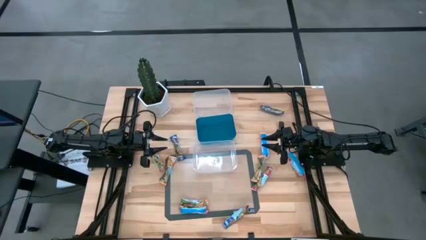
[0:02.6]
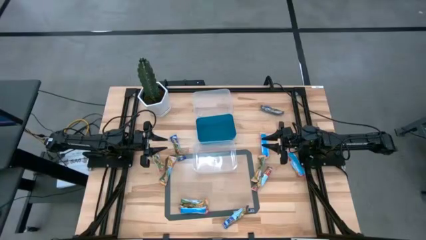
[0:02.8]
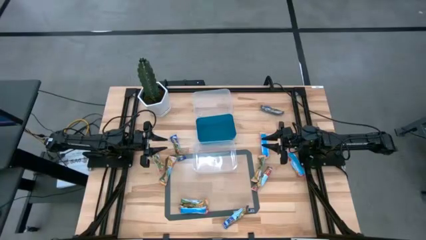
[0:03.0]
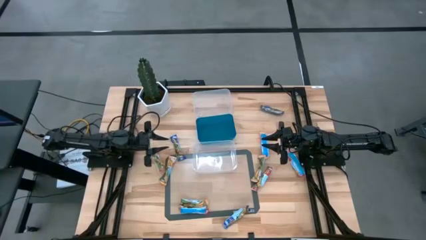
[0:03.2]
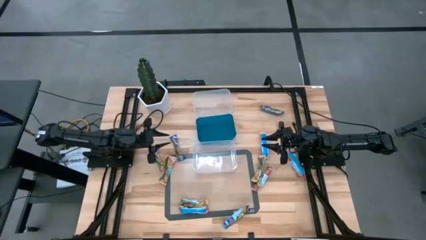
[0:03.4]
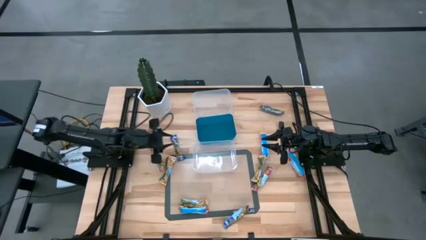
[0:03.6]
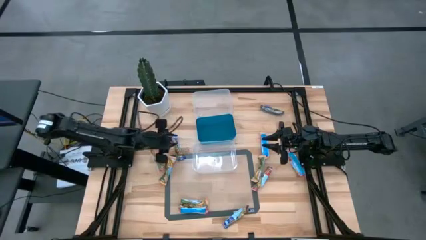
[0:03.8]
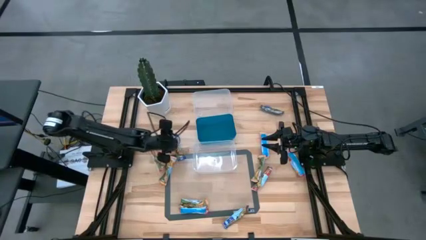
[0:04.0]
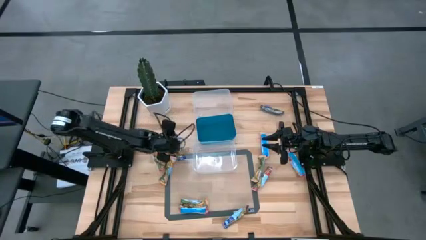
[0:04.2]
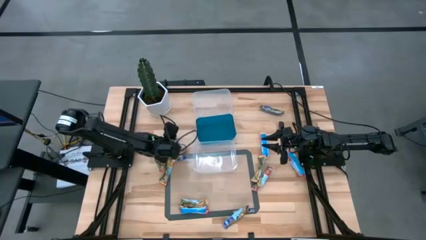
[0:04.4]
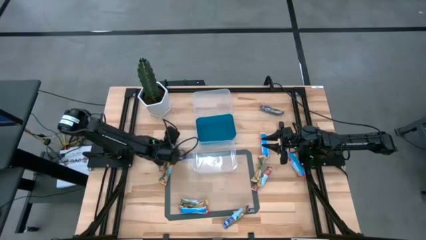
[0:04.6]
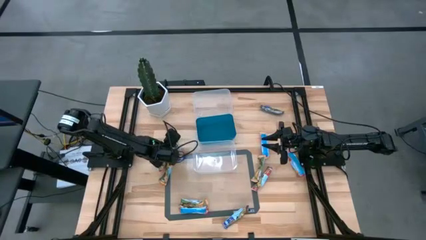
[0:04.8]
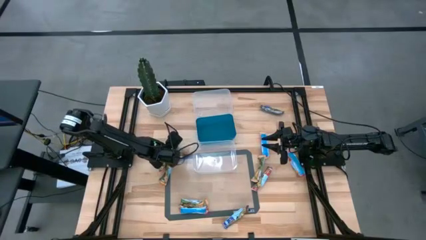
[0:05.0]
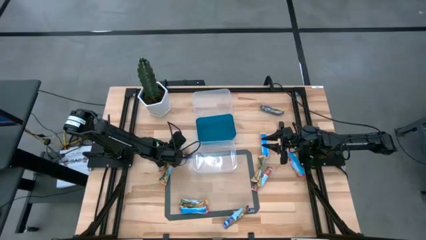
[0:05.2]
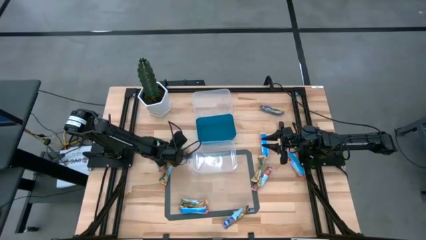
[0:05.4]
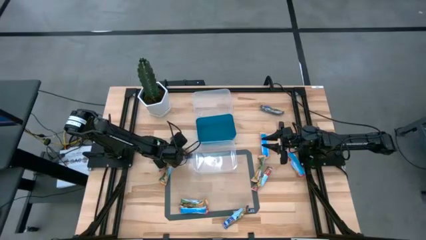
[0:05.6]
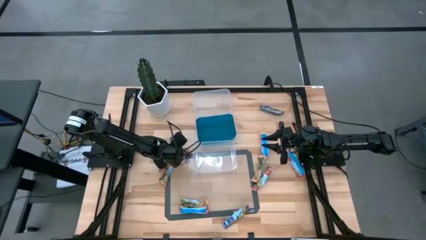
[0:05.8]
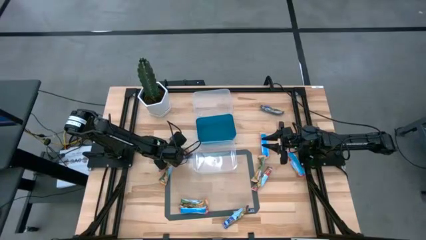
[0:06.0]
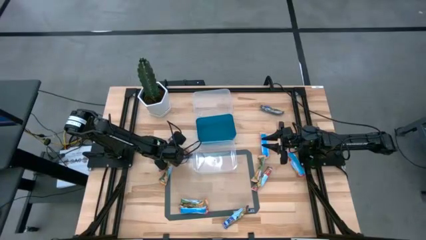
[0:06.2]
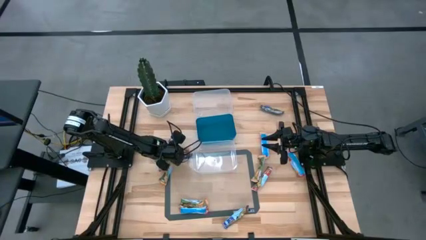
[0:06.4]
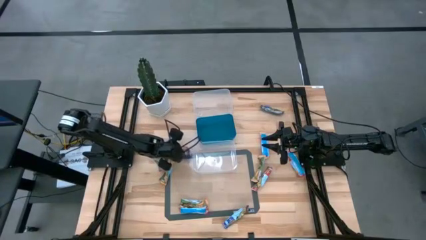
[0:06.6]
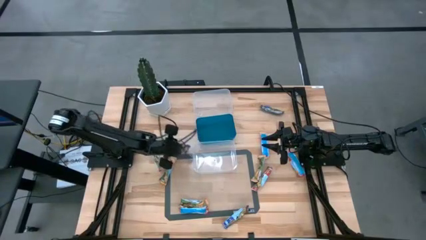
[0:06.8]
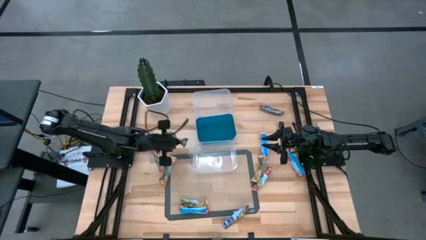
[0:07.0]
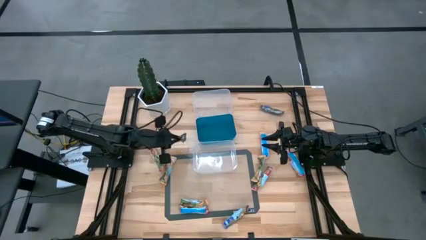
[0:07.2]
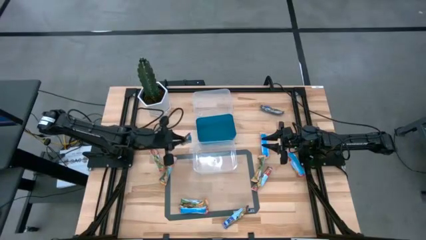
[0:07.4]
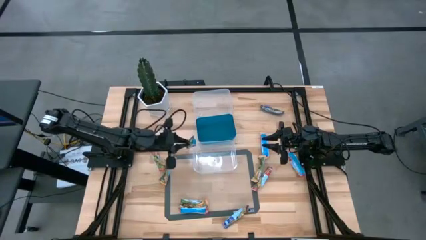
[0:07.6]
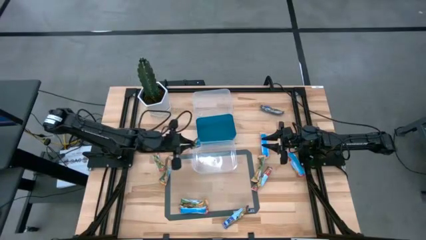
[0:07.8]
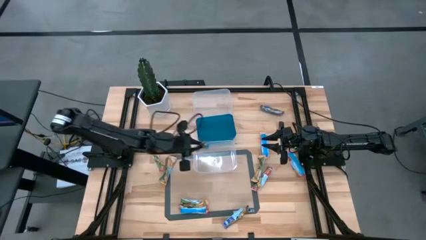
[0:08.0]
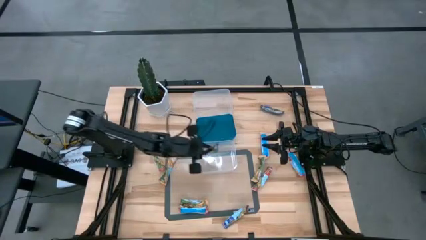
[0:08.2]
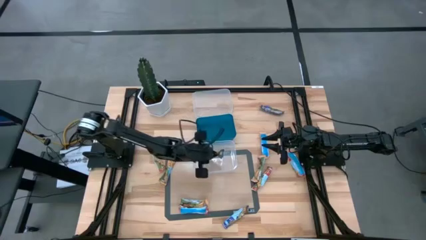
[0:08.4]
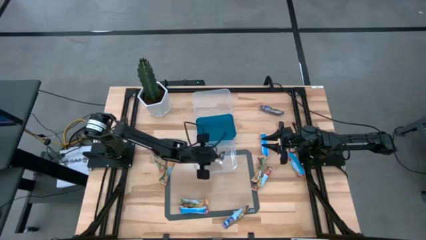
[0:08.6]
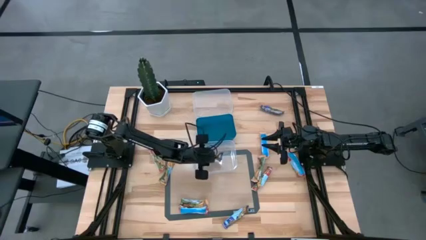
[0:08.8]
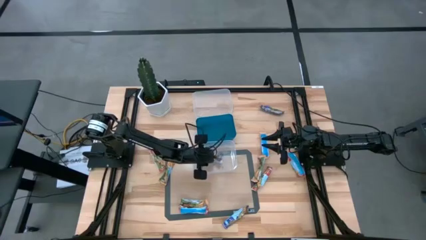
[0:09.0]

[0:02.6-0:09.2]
Task: Pick and place Granola Bars by type
Put the blue granola bar into the bottom transparent bin

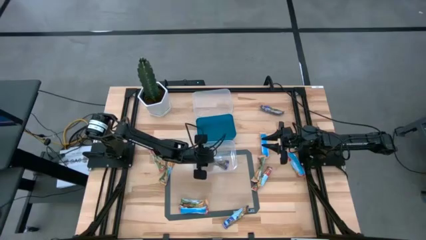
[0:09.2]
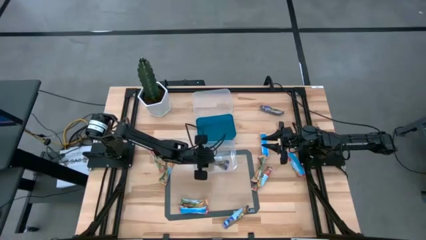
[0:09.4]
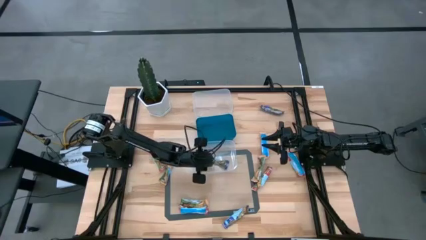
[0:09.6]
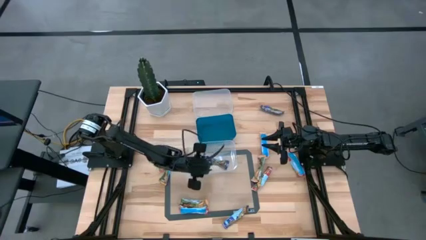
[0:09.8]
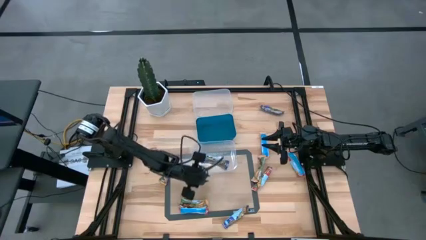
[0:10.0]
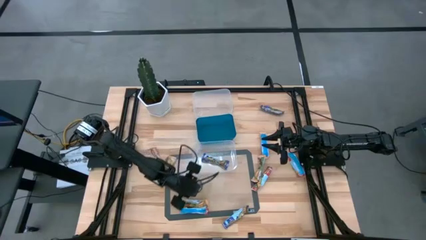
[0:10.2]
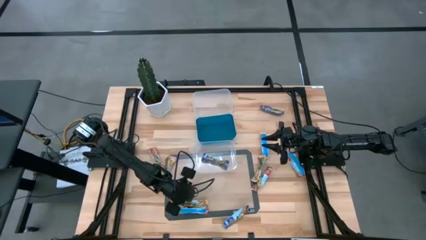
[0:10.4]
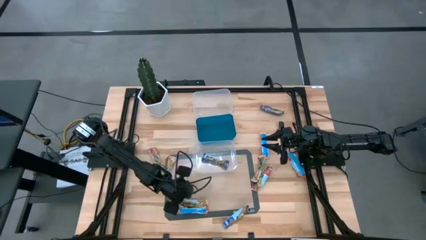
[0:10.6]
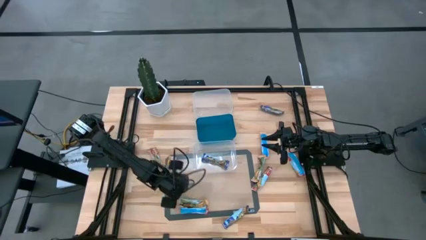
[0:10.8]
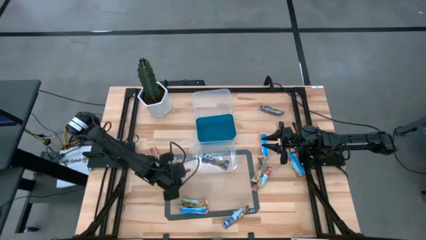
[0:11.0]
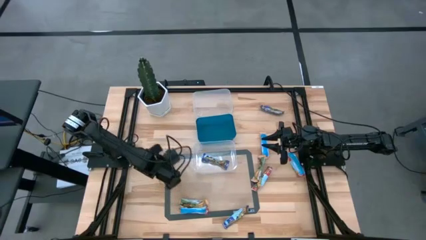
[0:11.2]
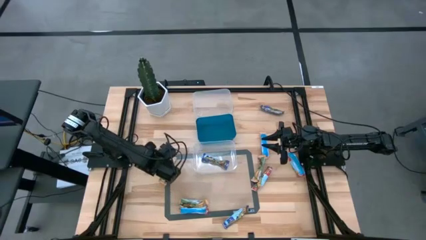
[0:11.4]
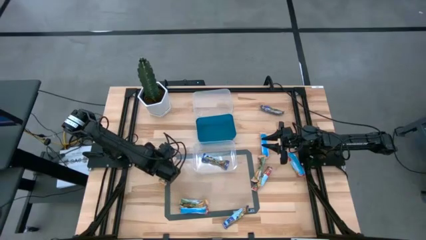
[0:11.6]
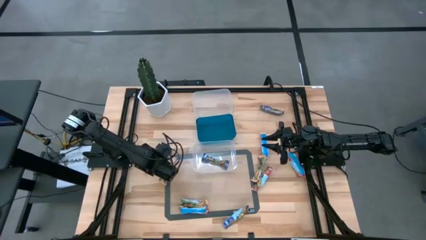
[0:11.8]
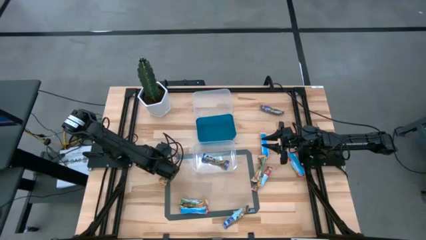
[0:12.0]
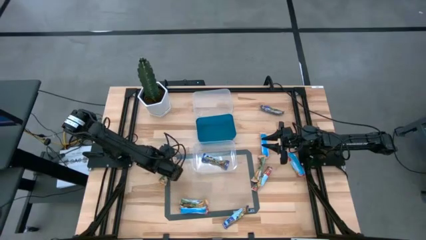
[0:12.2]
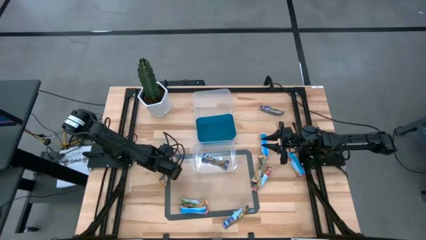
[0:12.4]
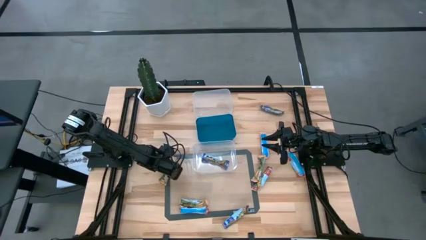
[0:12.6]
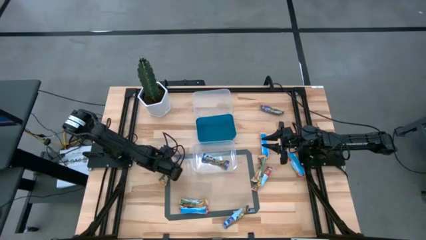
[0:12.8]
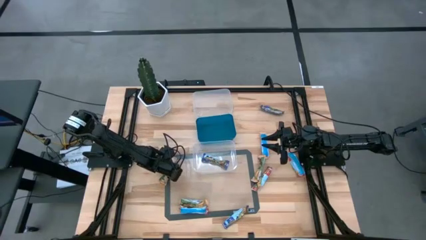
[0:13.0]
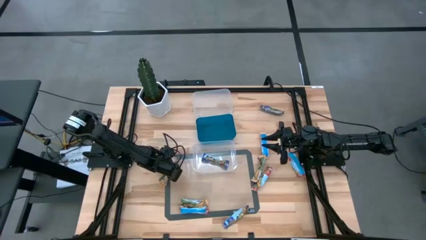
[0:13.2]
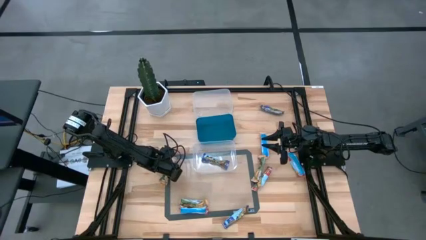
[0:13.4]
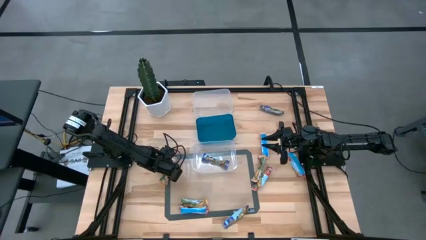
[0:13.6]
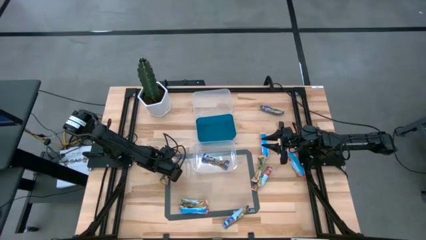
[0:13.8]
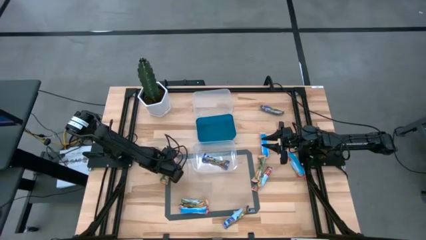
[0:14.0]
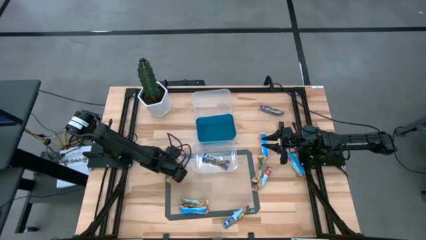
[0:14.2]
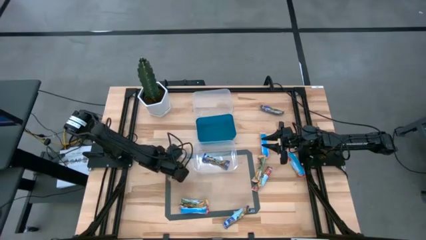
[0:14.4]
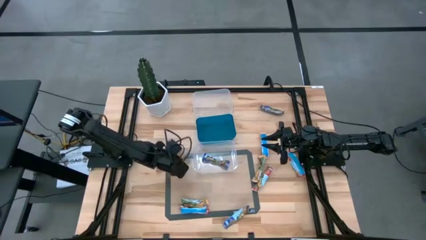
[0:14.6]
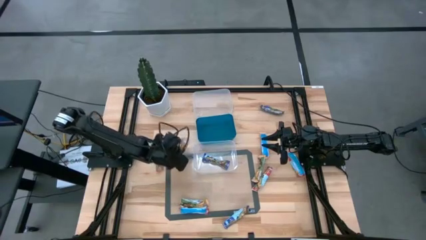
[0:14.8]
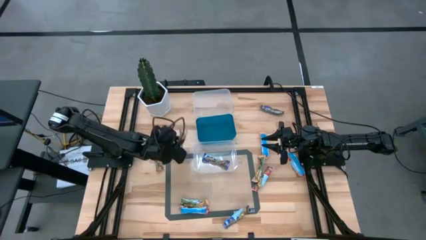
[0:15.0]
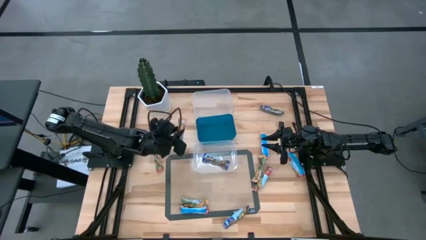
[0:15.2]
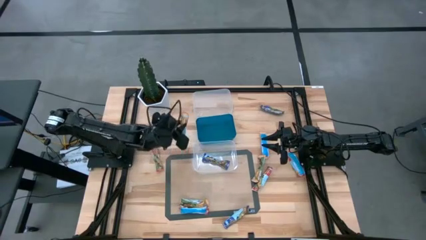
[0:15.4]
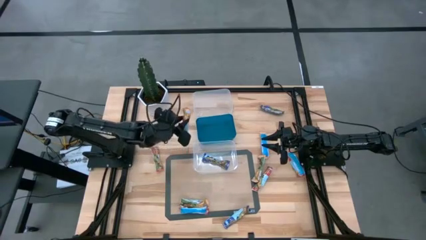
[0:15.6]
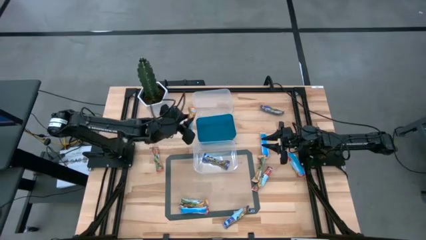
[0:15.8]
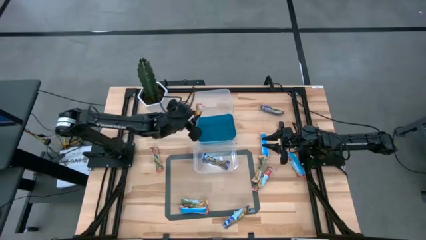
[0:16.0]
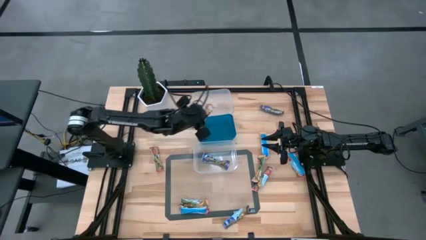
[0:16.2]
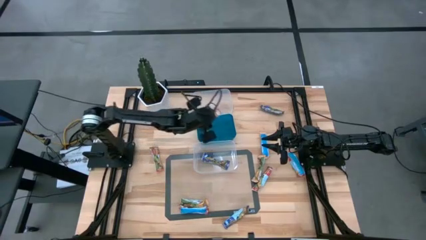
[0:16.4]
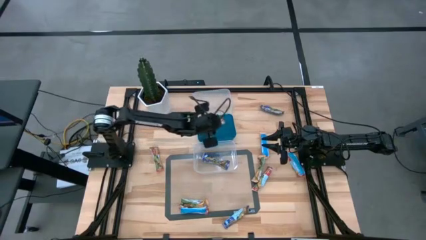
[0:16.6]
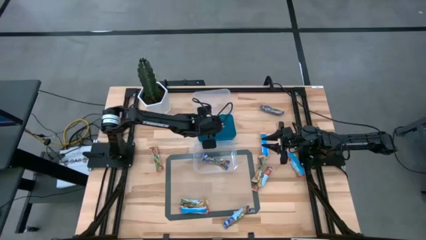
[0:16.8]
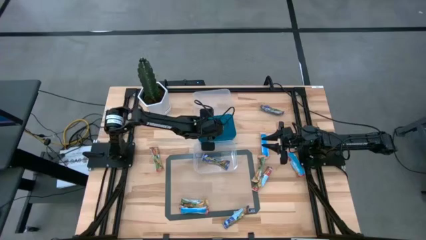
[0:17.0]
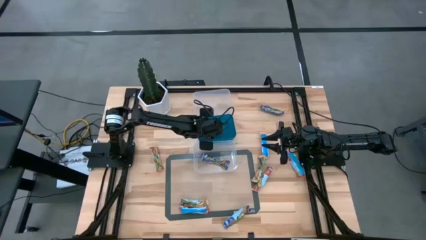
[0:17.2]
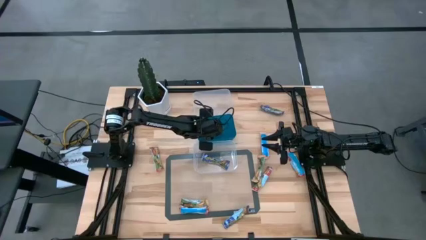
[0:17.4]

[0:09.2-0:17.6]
Put the yellow granola bar into the blue bin

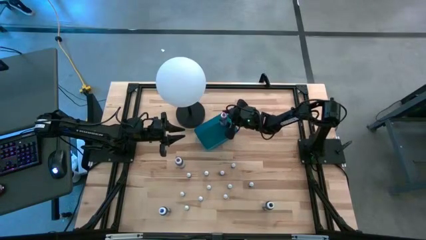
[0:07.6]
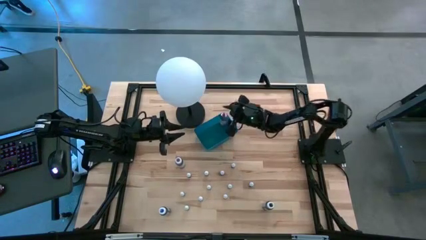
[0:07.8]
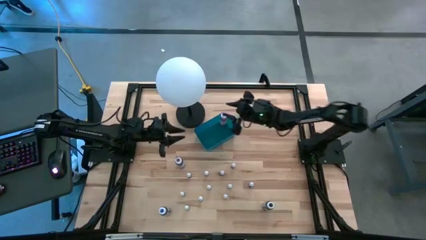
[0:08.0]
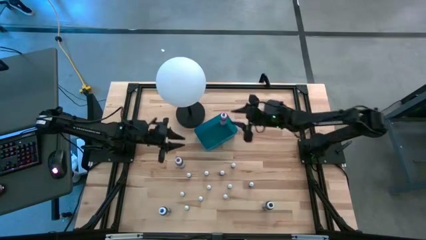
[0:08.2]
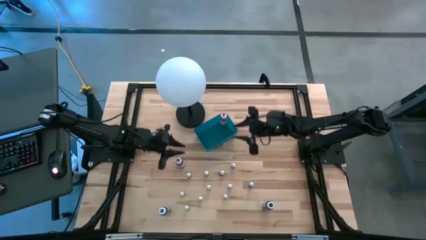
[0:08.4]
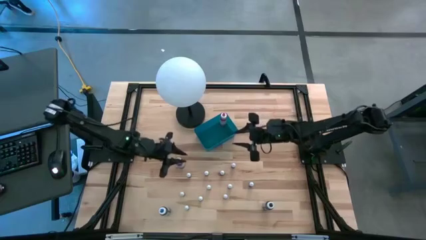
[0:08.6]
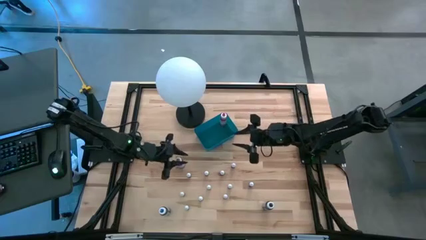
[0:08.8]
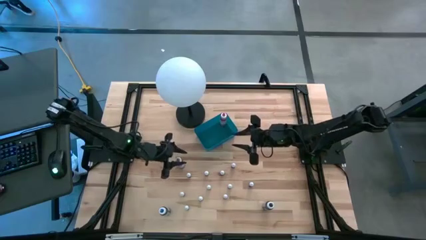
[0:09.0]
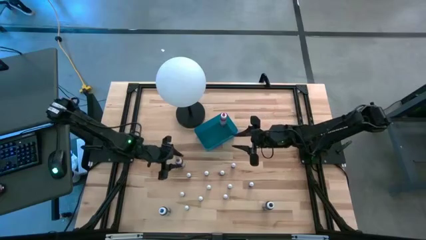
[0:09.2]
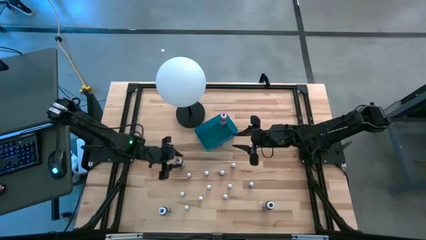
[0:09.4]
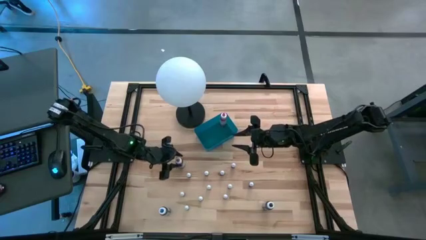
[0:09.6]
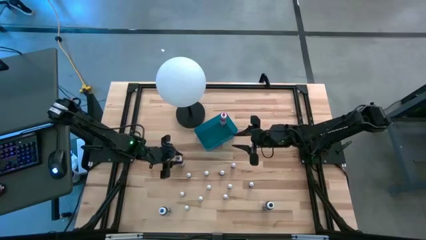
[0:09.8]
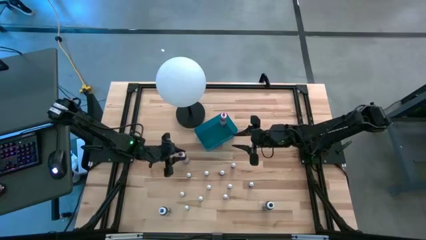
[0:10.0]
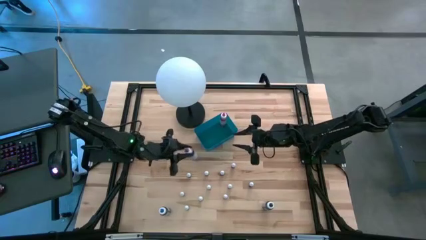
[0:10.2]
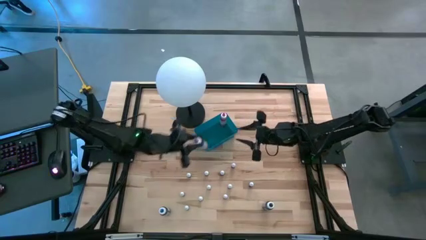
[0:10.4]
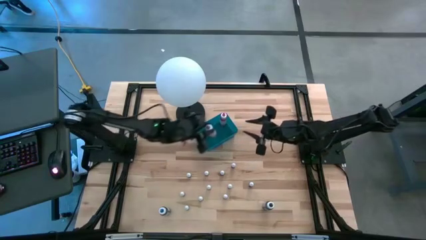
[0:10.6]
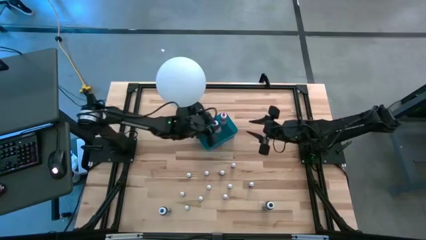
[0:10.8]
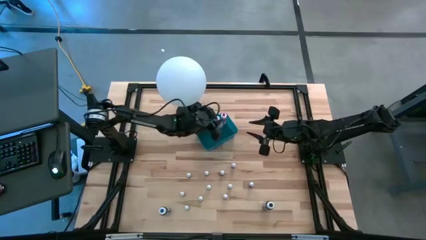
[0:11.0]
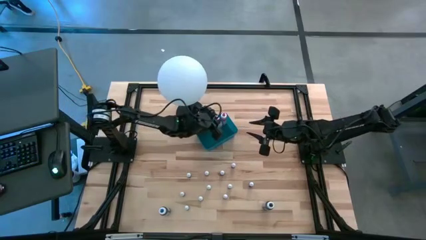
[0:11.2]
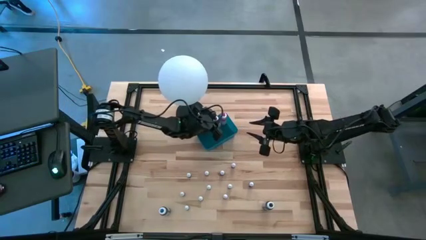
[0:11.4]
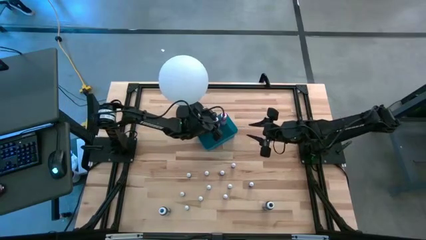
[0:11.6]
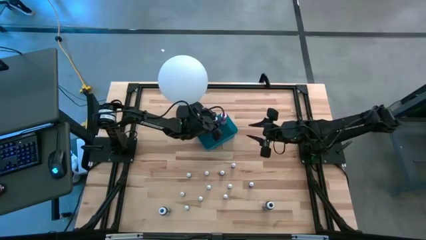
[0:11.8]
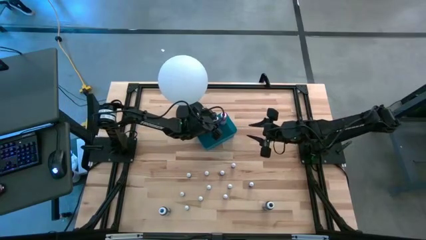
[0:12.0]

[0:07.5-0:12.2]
Task: Pick & Place food coloring
Put the large purple food coloring bottle into the bin
